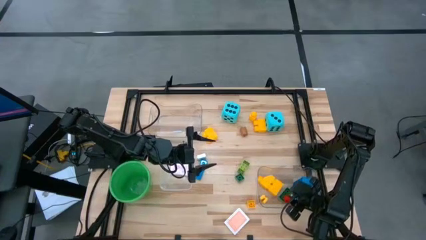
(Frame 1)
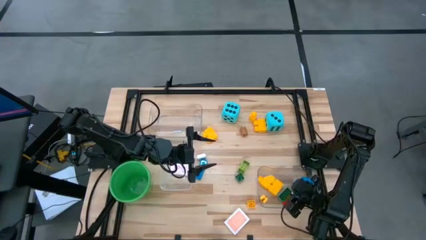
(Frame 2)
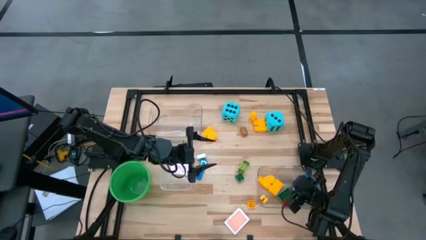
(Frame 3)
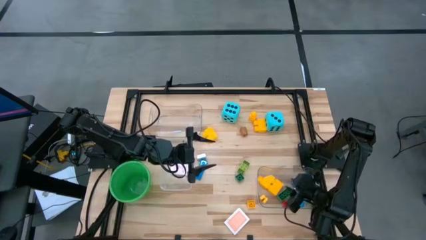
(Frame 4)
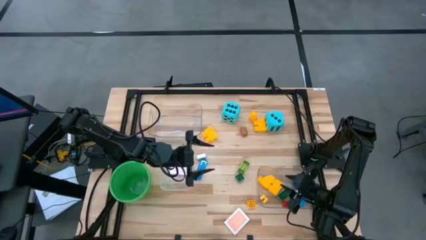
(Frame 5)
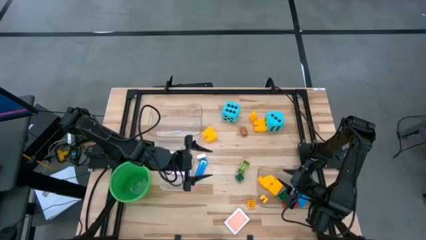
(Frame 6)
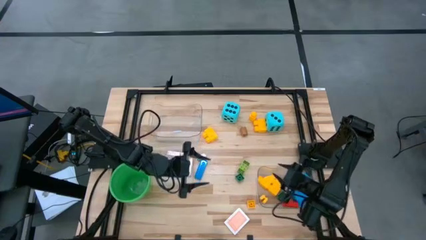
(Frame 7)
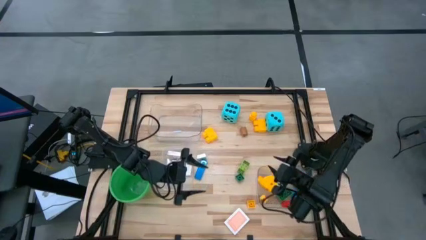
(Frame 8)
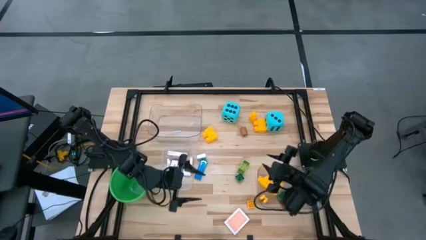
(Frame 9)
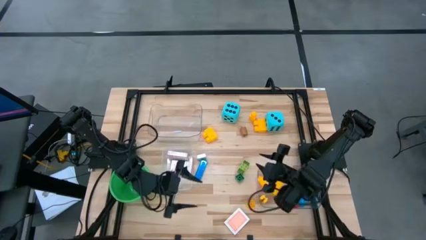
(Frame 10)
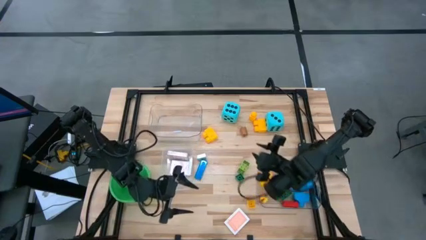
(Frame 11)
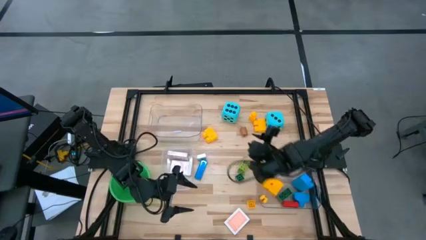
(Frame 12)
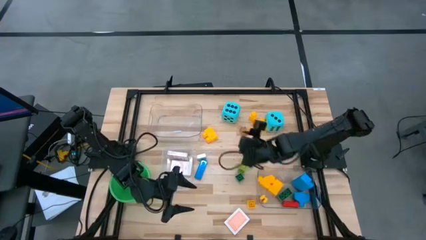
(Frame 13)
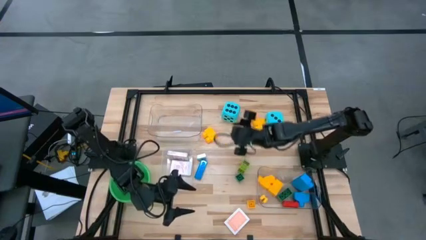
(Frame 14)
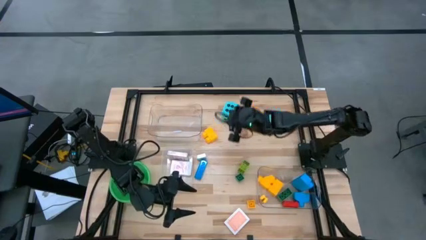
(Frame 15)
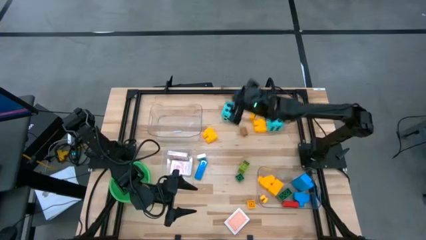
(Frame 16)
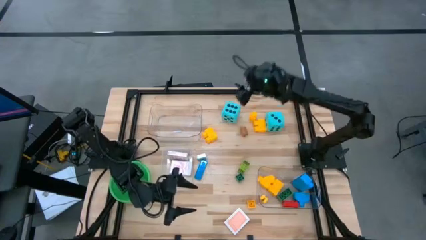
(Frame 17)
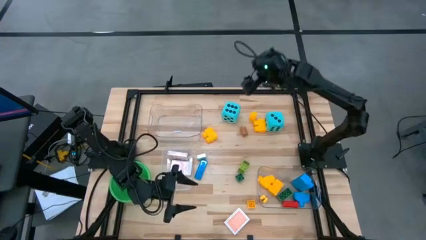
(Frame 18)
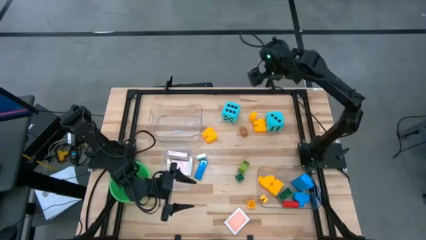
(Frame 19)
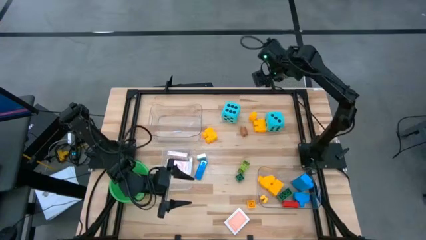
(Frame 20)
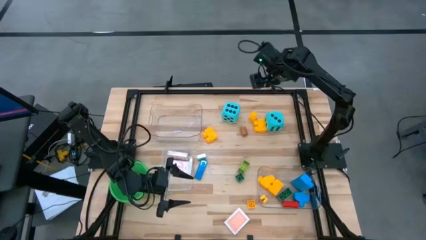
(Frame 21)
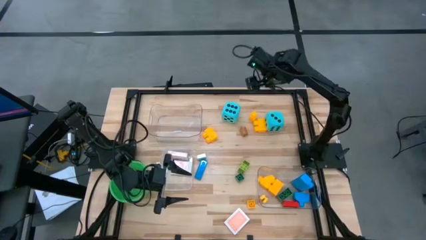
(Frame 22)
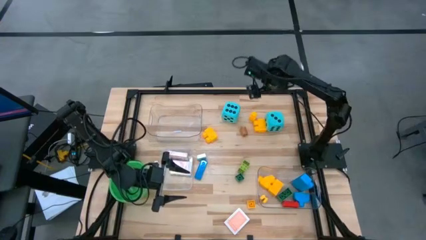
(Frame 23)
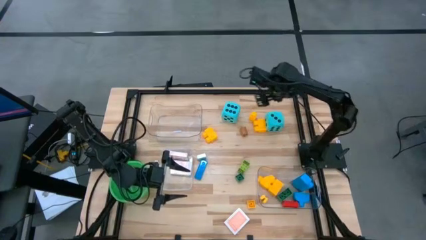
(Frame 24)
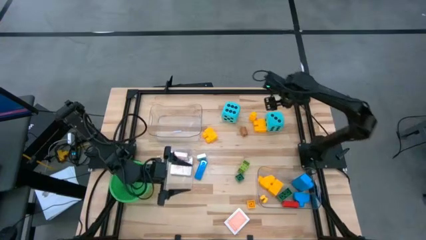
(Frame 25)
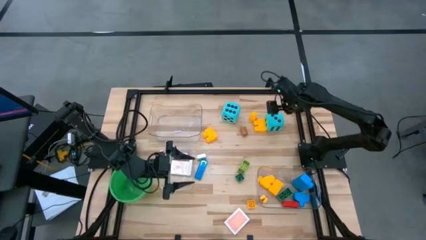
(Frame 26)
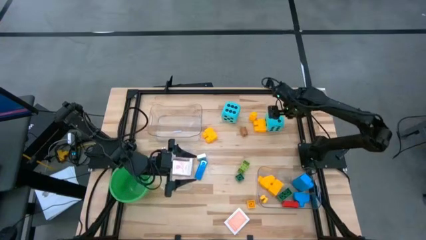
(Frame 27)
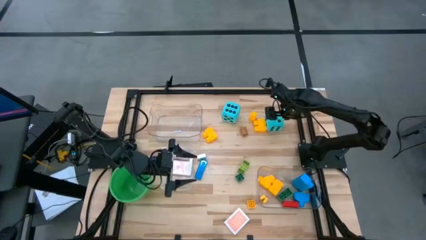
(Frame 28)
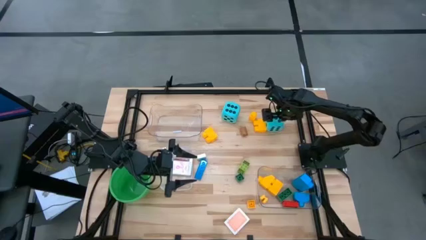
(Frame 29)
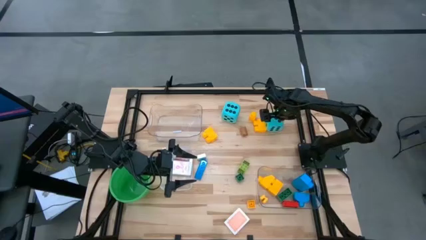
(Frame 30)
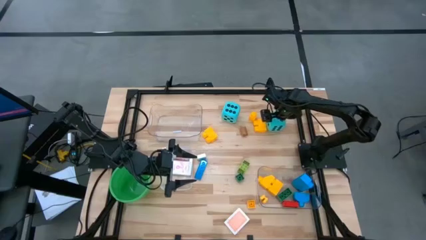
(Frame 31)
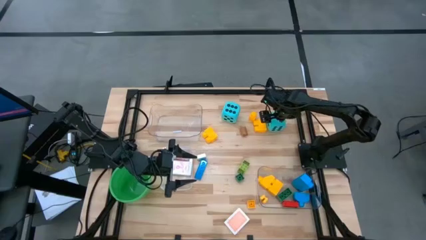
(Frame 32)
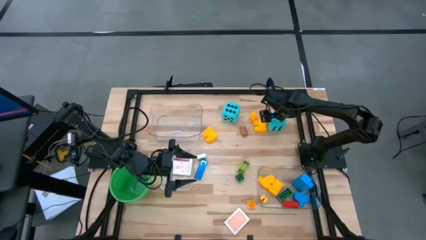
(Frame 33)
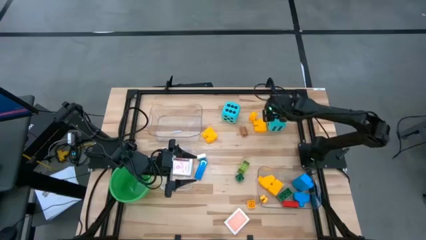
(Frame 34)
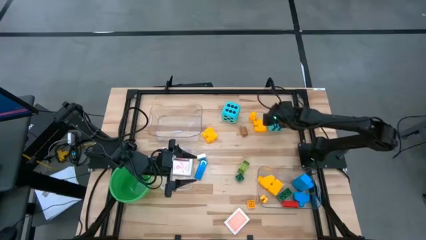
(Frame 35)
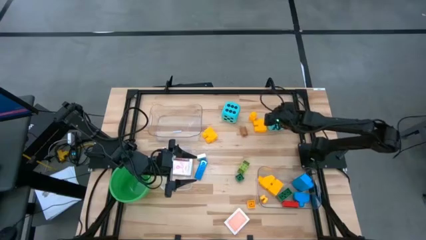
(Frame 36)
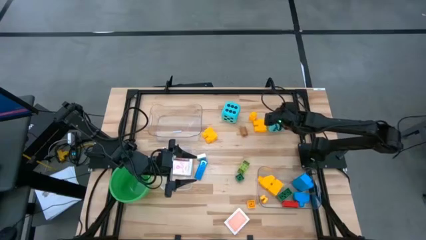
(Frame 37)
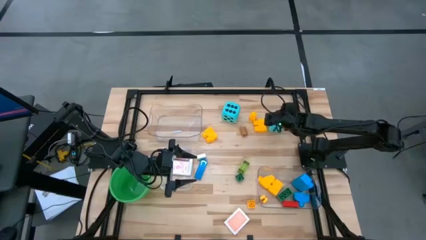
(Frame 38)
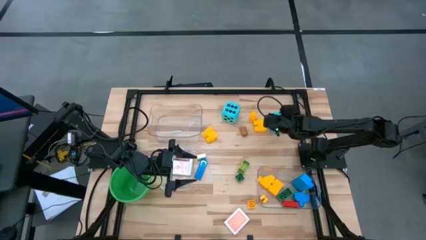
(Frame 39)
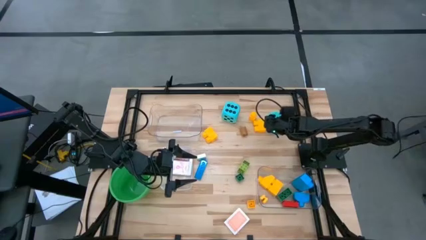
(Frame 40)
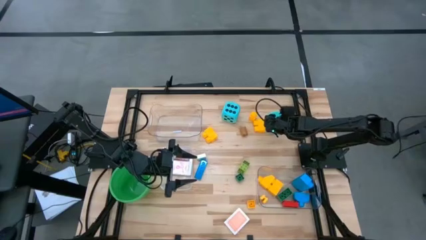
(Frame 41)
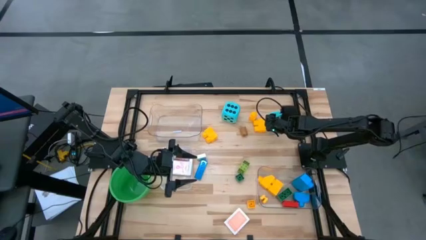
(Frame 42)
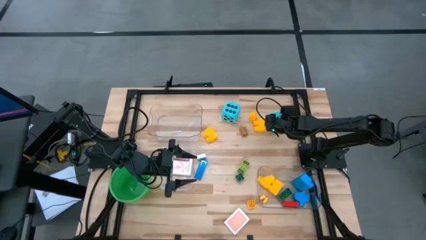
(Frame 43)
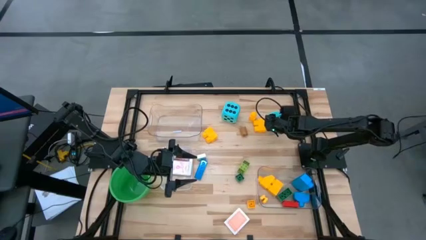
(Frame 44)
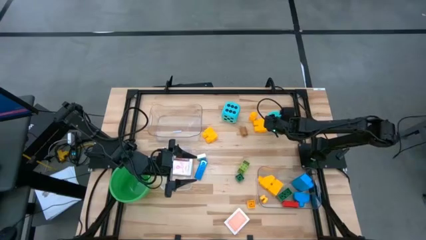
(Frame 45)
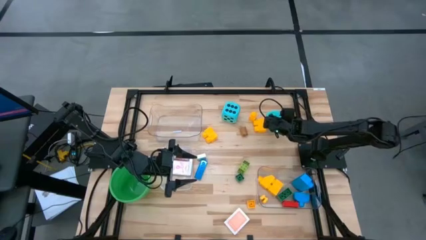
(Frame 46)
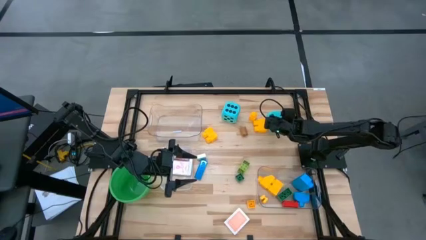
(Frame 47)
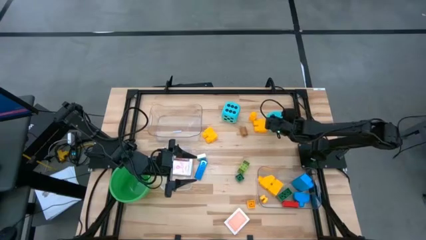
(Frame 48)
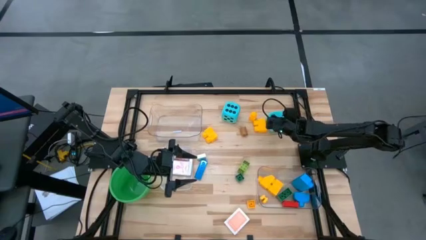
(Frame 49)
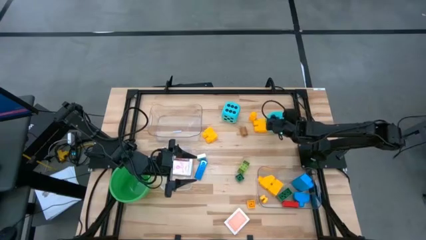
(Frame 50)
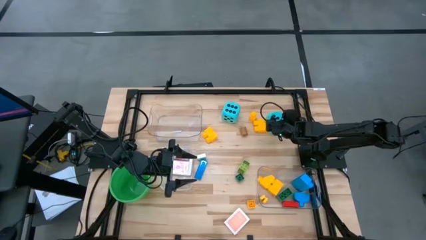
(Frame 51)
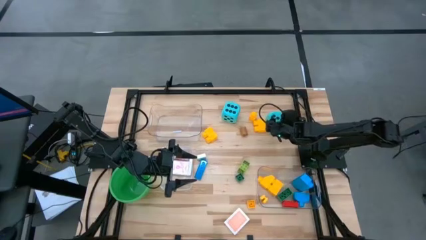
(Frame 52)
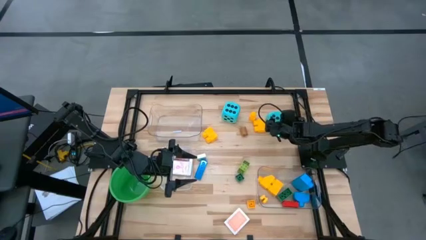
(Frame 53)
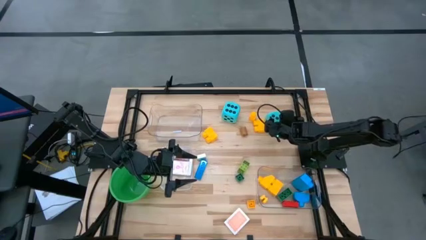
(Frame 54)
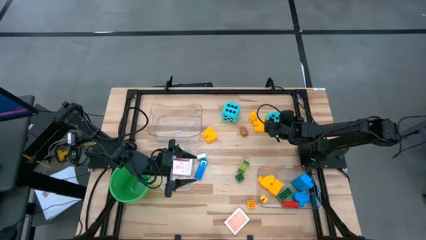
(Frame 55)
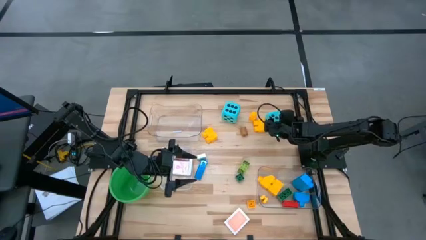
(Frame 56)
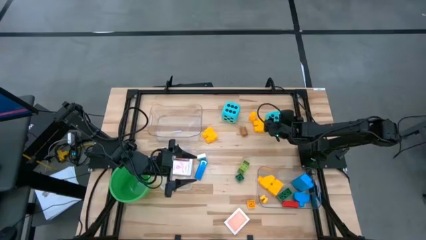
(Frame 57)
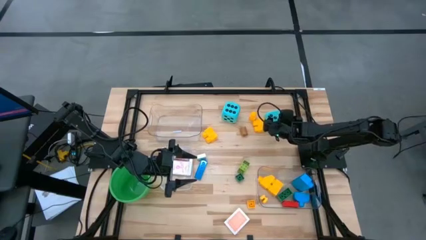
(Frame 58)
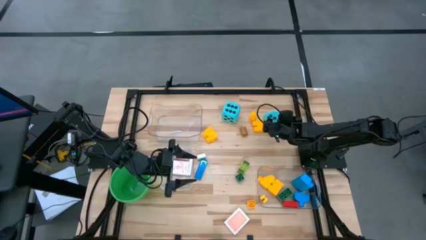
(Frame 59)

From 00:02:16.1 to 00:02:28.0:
Task: Pick & Place Toys
Put the light blue dice into the top transparent bin

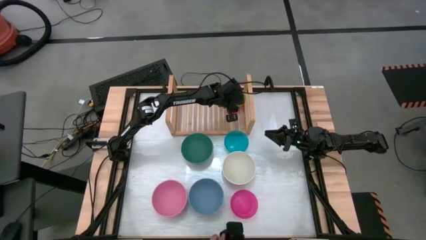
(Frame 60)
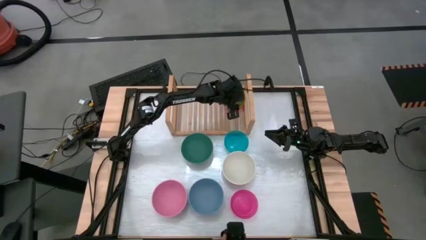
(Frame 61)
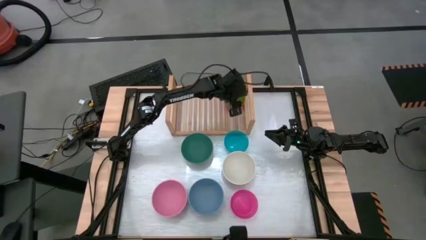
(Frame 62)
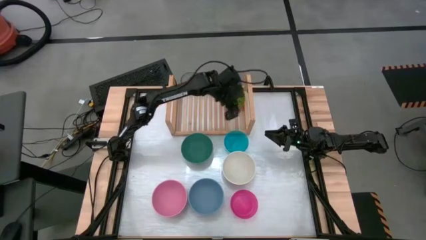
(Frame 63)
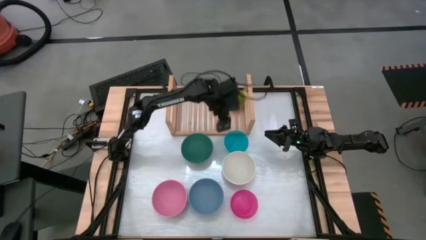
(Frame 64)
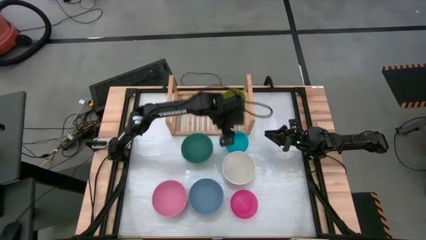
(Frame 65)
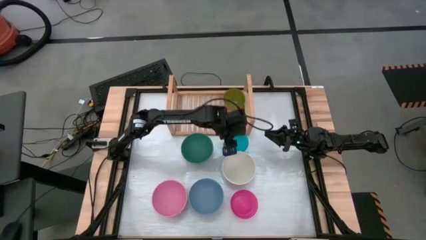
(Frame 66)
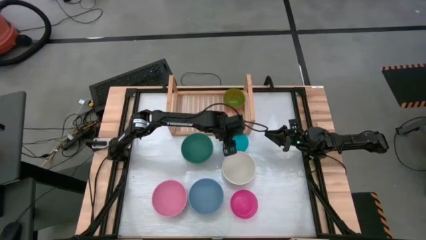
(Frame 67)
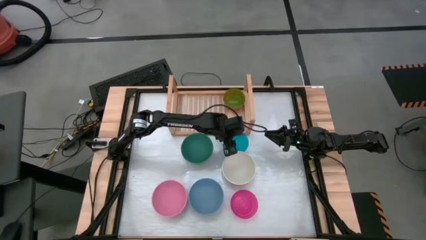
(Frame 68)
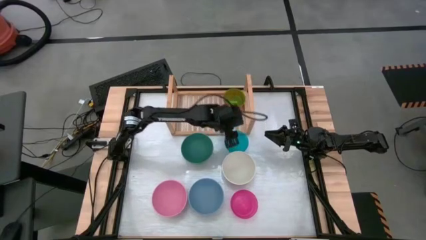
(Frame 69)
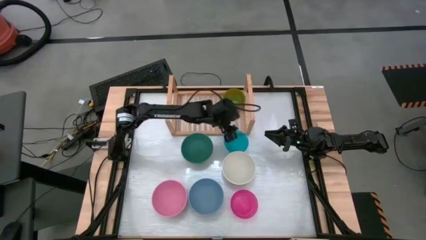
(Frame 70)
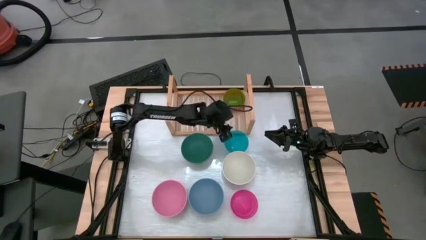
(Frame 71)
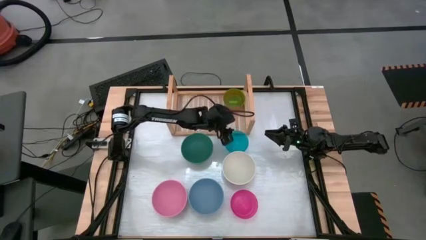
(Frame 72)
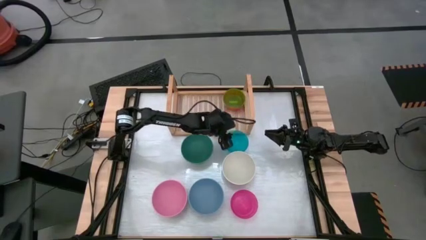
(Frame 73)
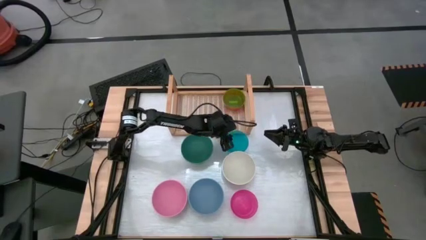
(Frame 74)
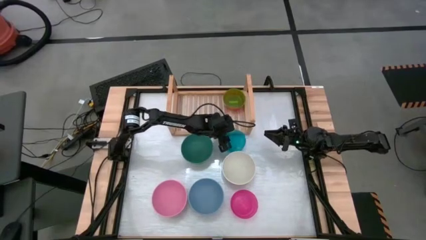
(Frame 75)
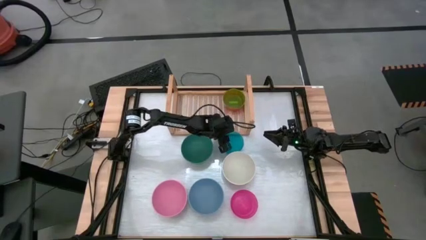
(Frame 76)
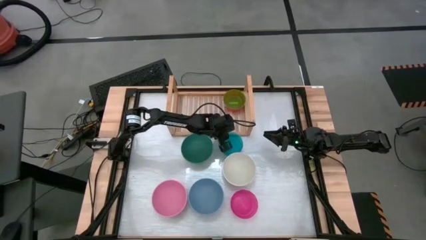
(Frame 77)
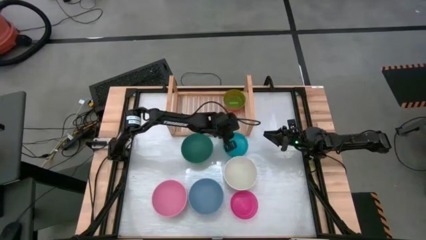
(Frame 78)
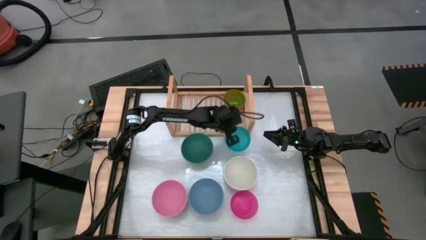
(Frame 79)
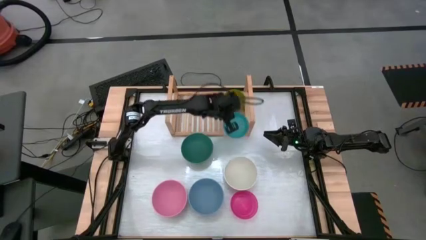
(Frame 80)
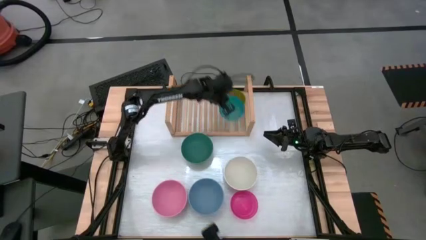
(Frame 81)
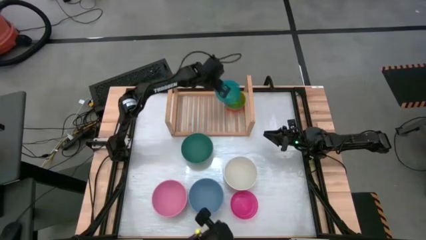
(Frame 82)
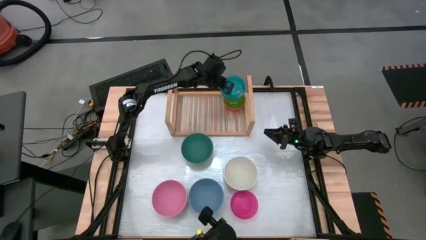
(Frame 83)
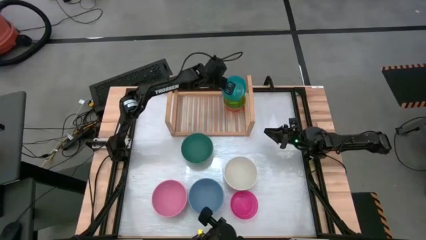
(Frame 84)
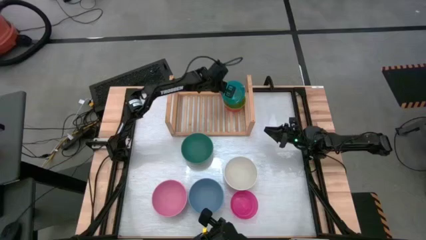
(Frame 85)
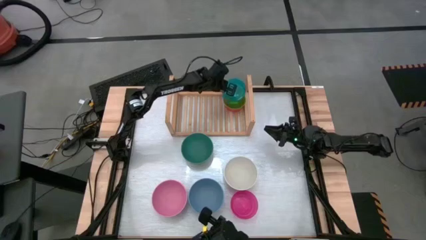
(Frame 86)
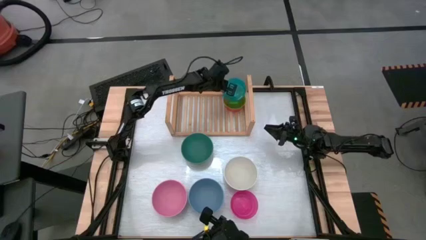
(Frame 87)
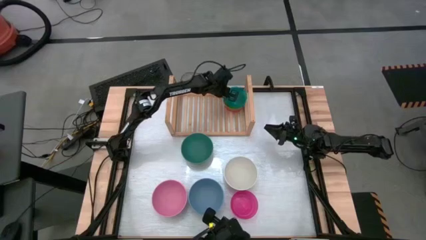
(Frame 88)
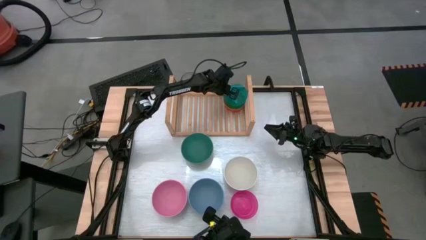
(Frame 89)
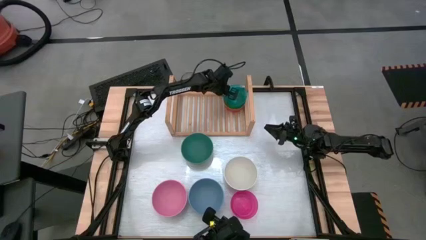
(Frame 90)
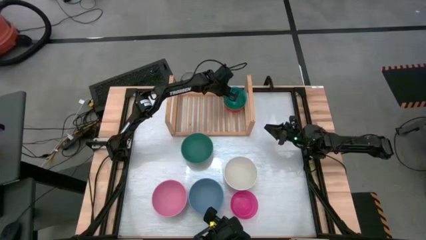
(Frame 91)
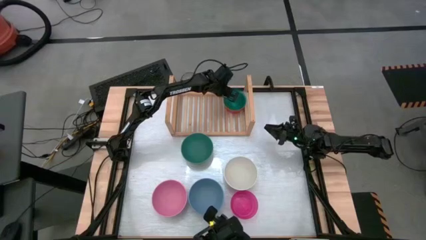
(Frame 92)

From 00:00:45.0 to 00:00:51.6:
Task: Place and stack bowls onto a shelf
Stack the small light blue bowl on top of the small light green bowl on the shelf
